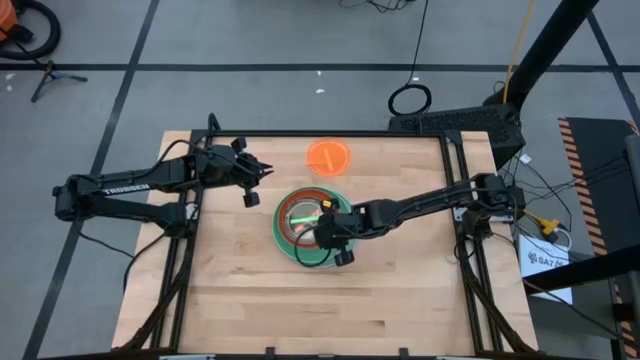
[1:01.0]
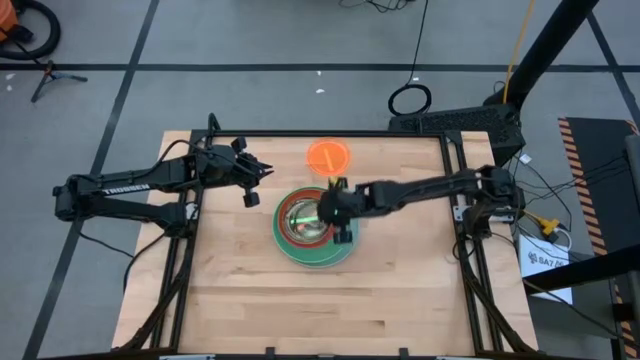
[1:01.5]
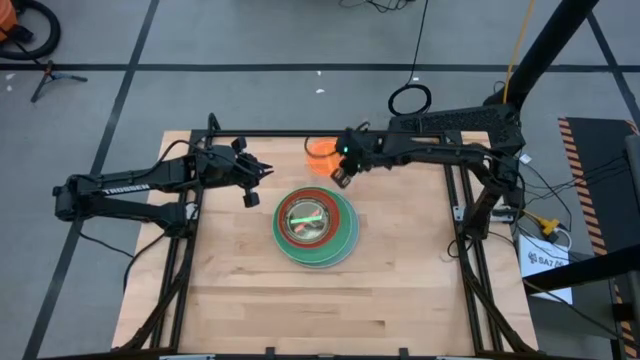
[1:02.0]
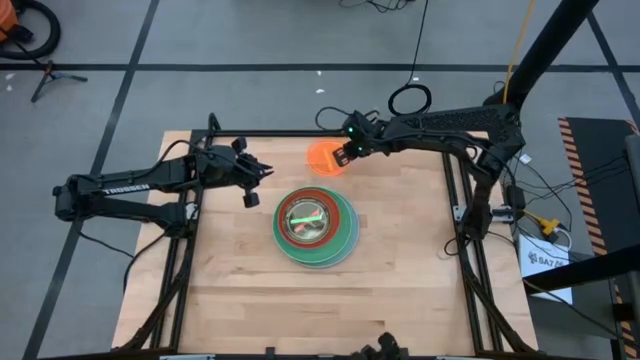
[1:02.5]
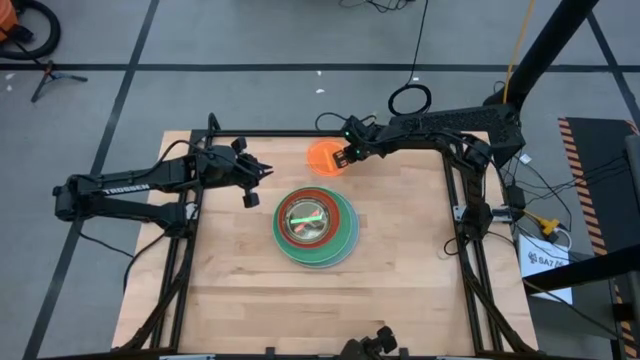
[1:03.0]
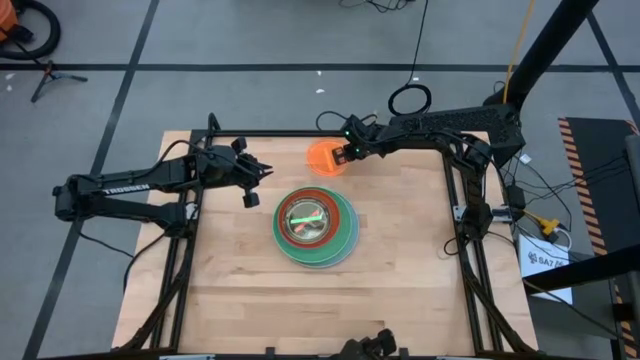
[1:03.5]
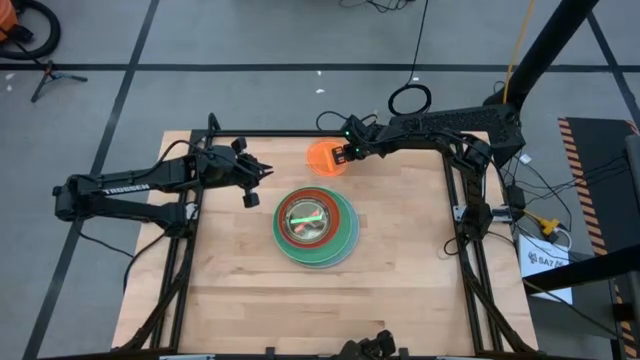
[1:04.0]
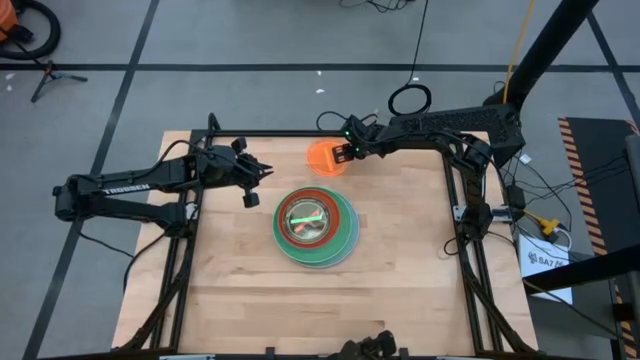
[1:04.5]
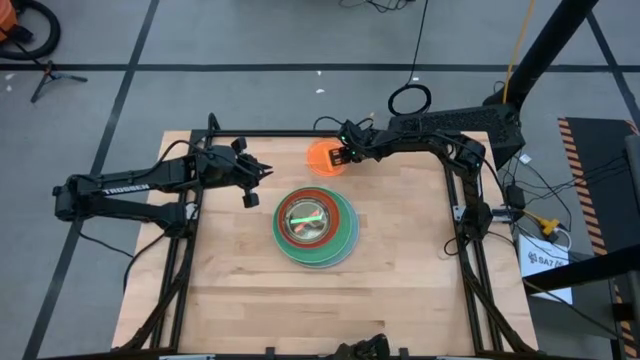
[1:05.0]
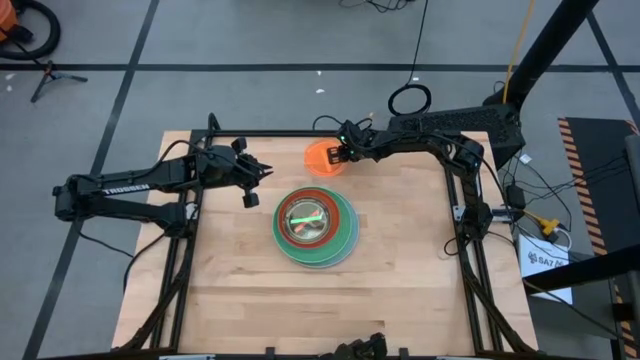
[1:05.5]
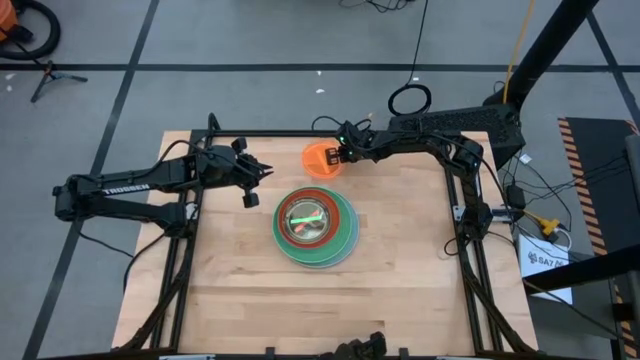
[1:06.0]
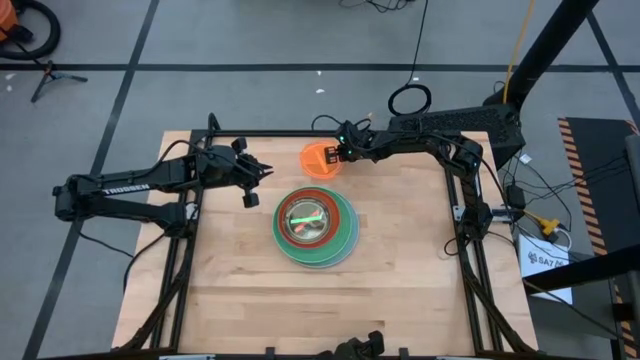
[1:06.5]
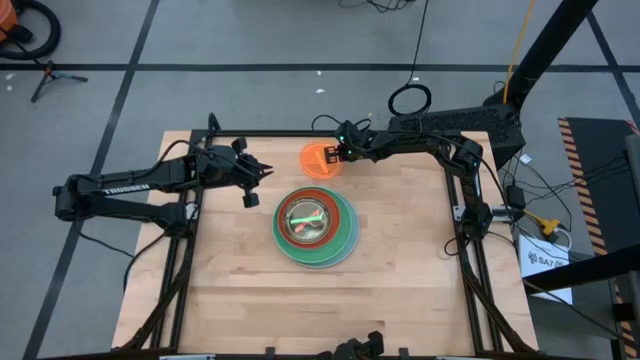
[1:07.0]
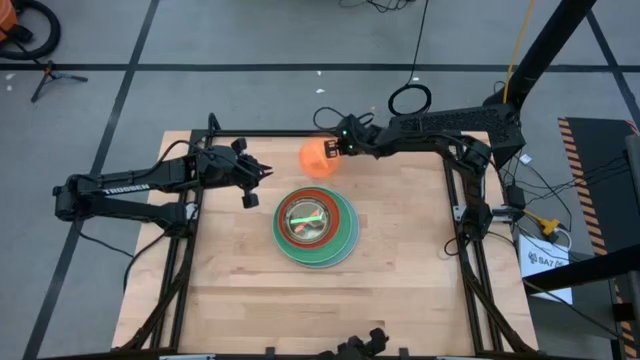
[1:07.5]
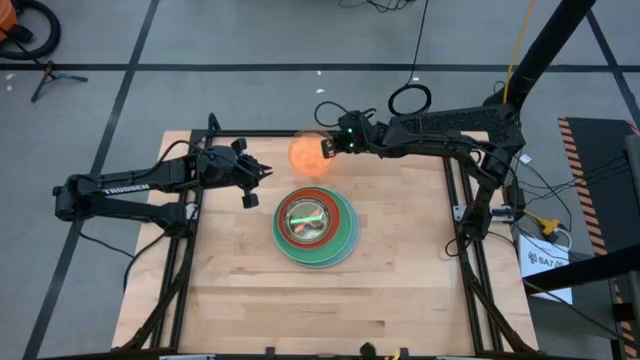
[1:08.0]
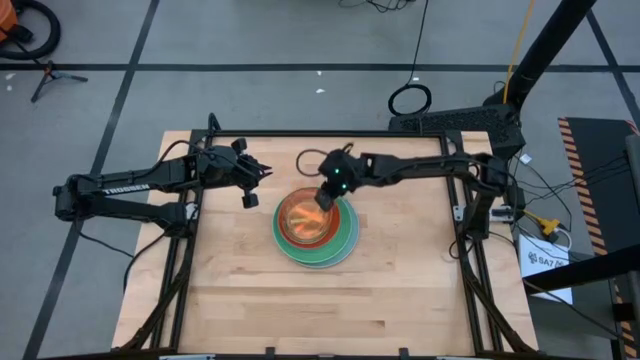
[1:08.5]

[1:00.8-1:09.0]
Task: Stack plastic plates
Stack the orange plate on top of the light green plate

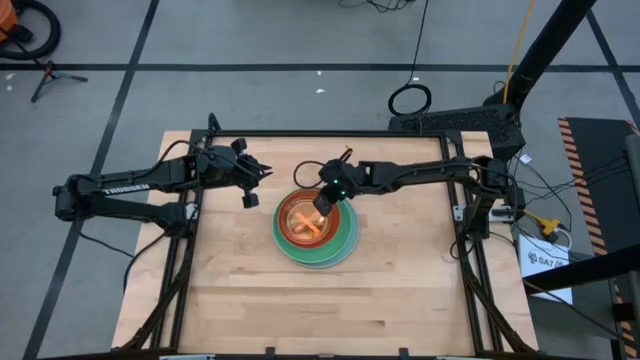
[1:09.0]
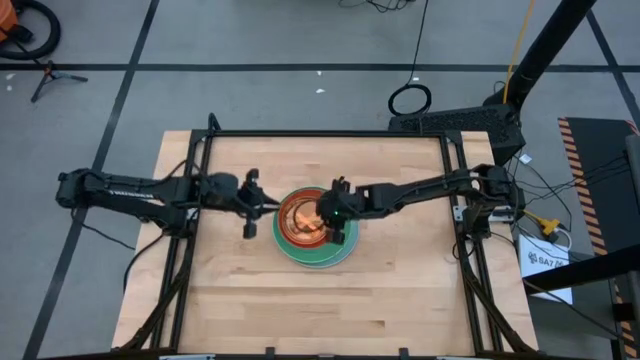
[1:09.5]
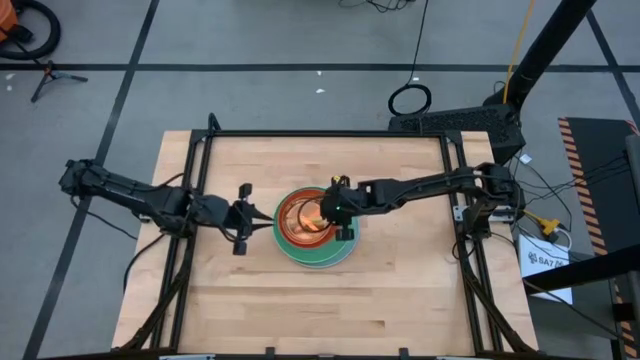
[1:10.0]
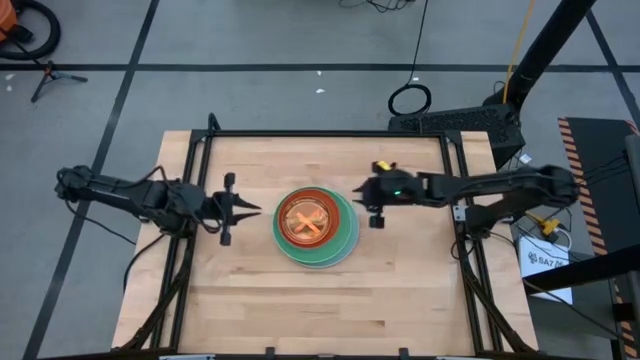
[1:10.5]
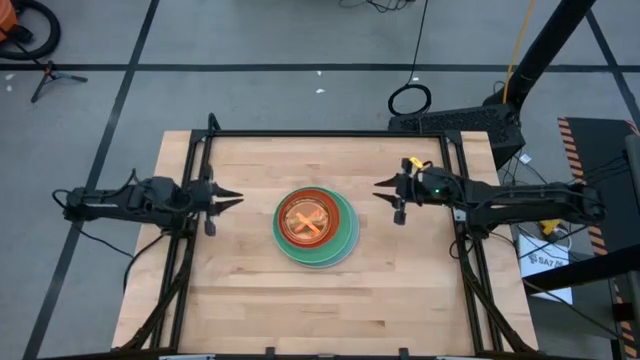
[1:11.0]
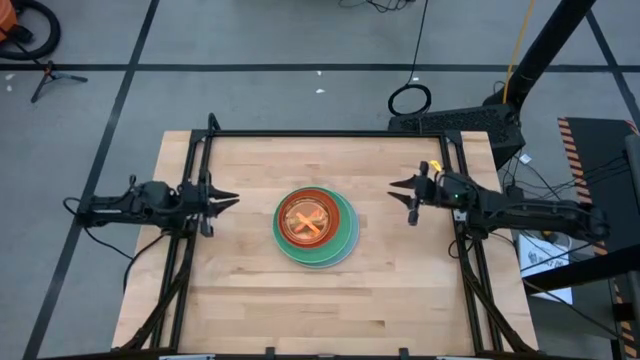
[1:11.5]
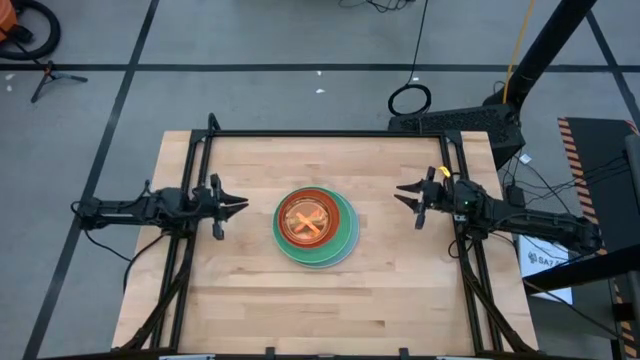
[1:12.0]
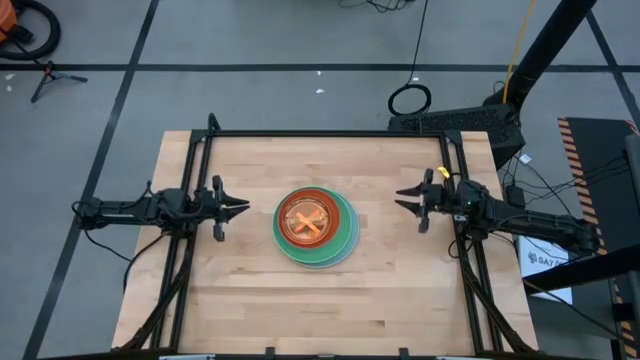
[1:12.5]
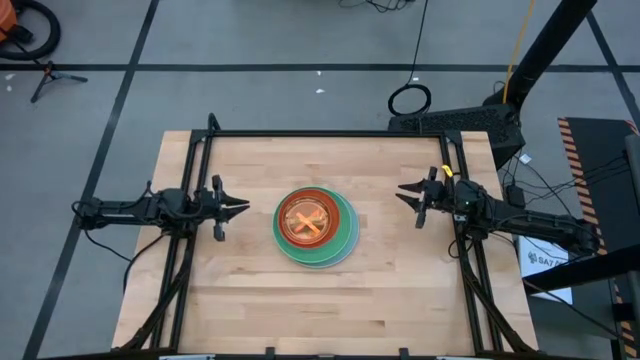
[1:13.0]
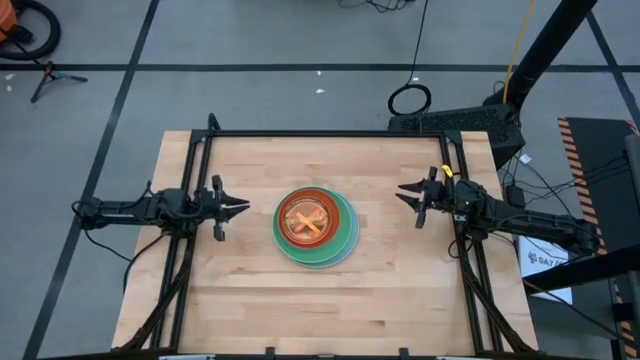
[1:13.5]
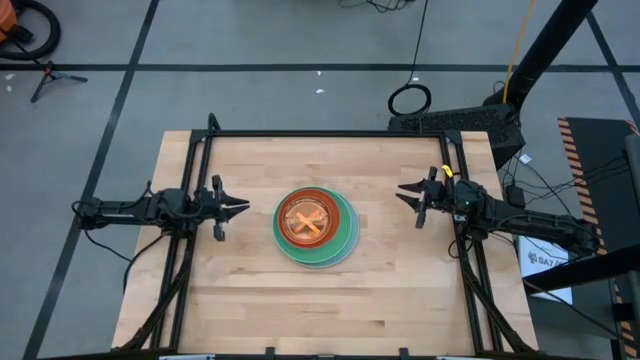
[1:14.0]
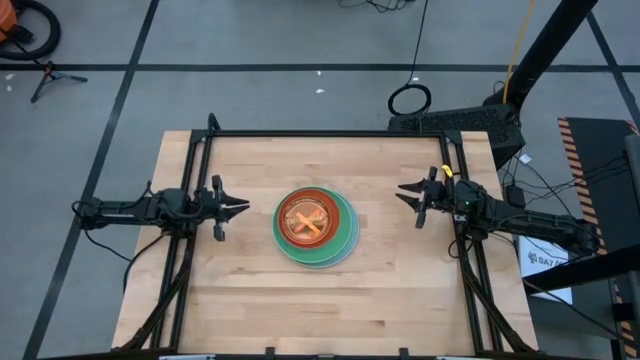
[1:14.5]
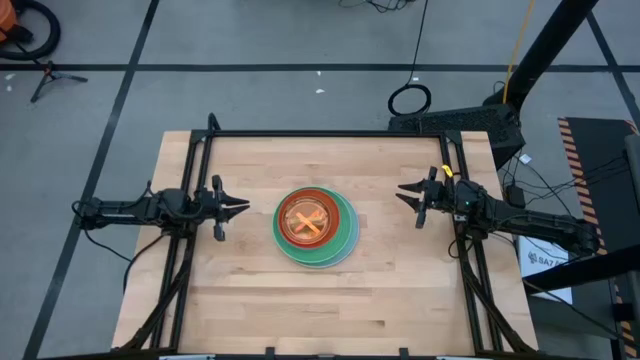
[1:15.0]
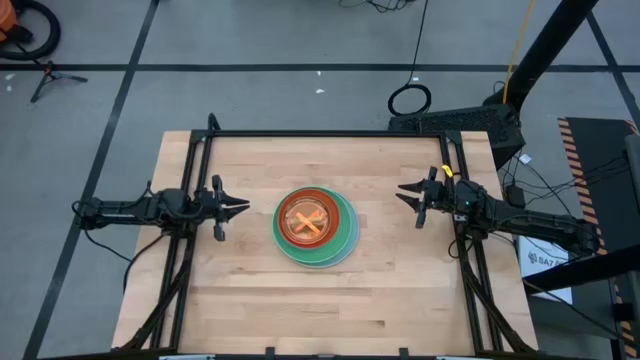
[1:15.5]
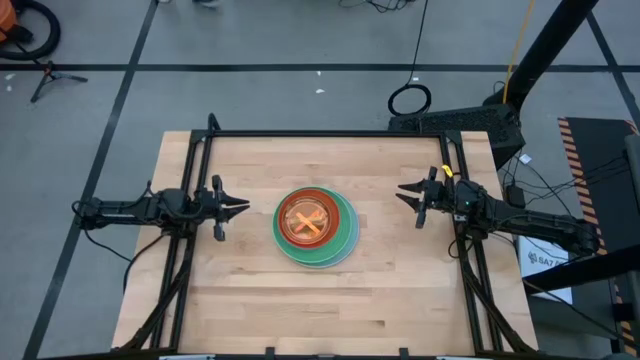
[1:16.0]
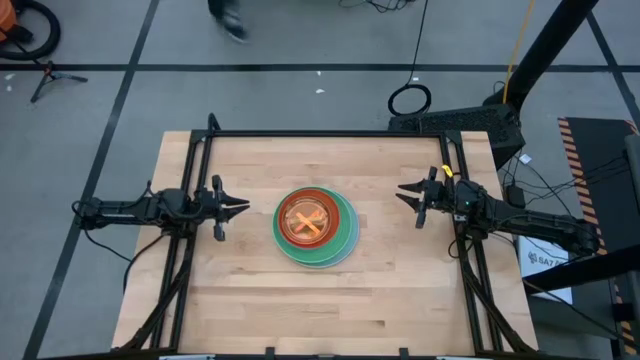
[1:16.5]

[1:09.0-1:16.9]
Return to Home Position

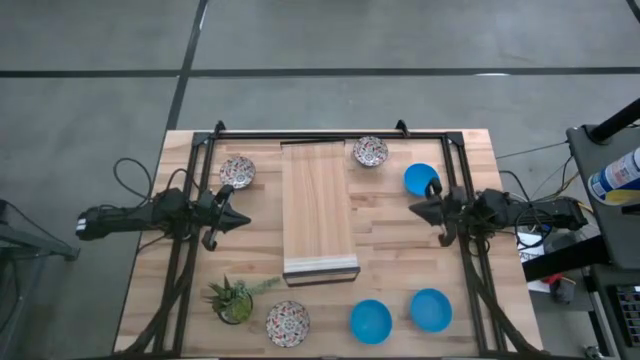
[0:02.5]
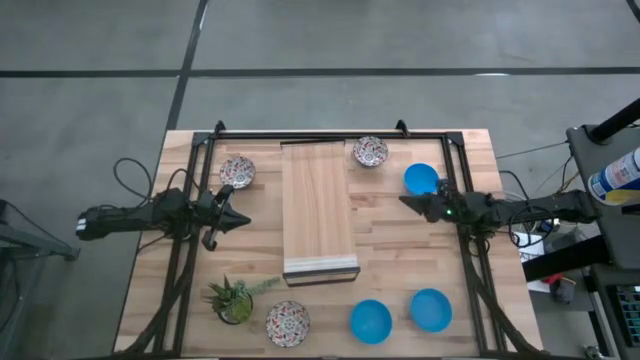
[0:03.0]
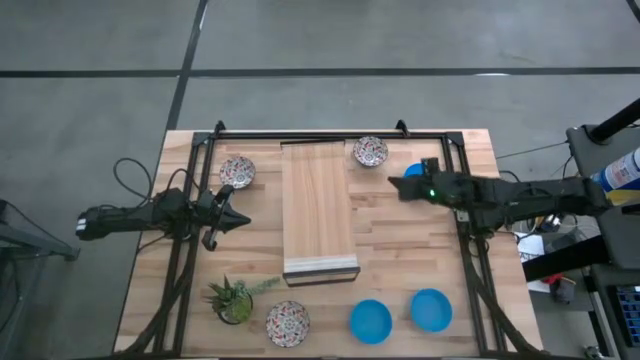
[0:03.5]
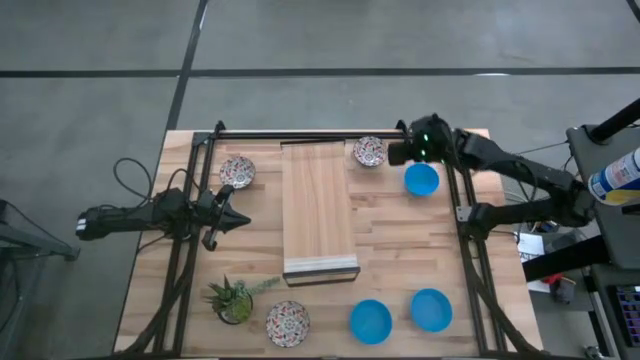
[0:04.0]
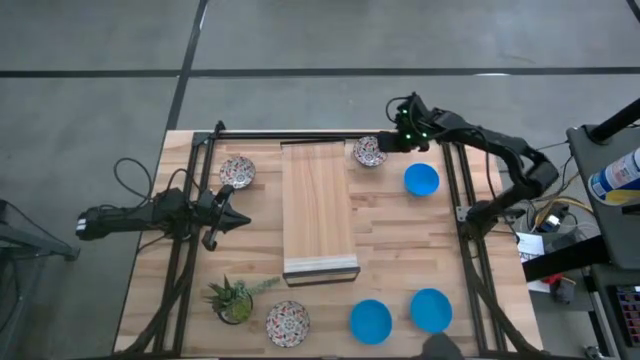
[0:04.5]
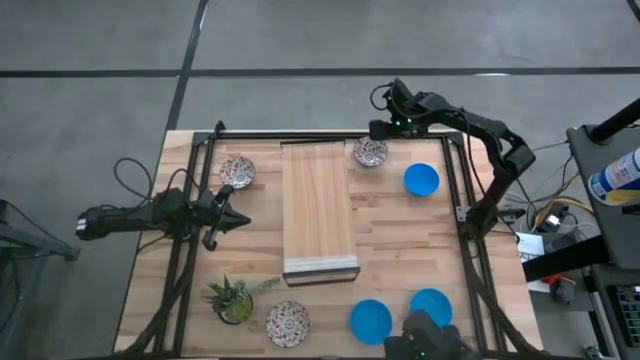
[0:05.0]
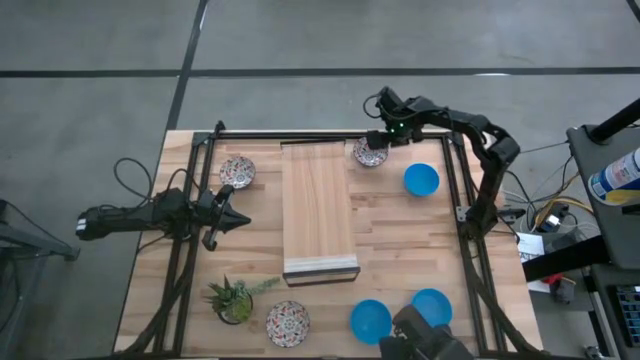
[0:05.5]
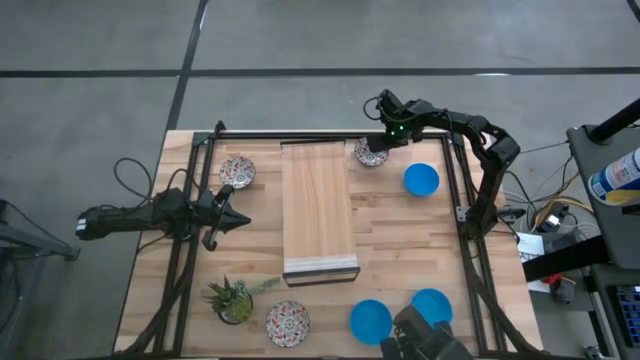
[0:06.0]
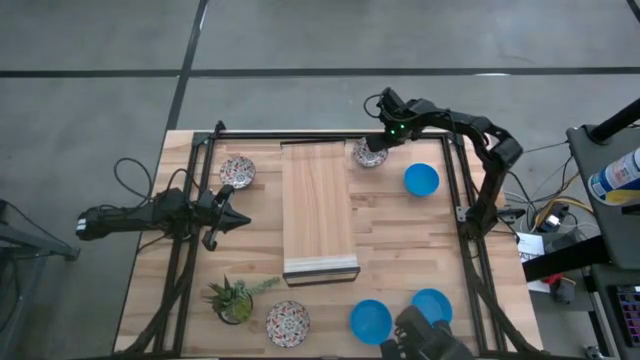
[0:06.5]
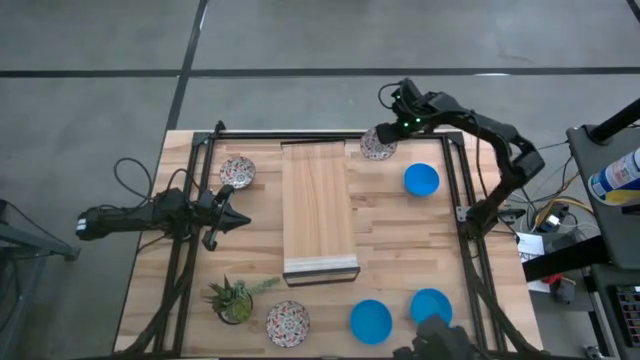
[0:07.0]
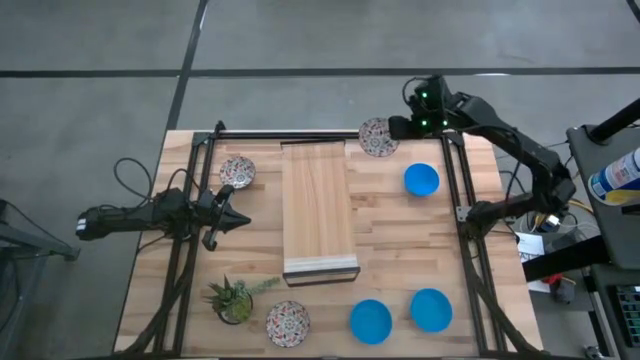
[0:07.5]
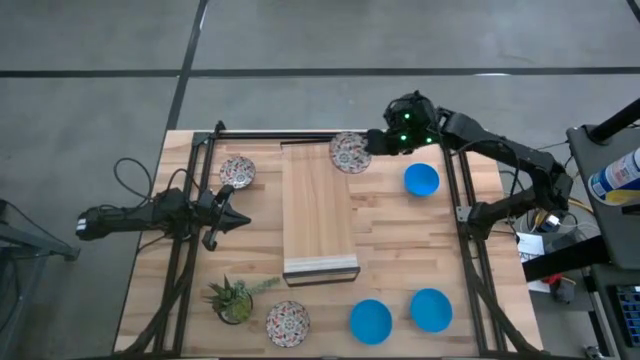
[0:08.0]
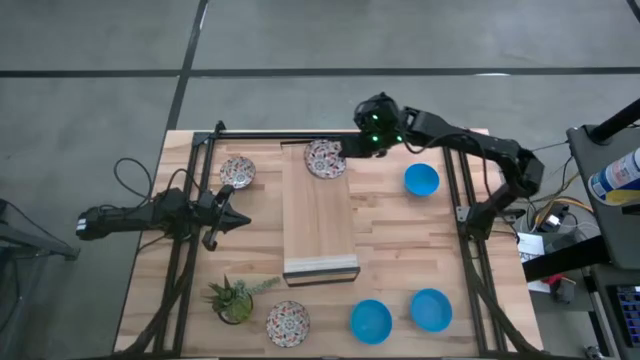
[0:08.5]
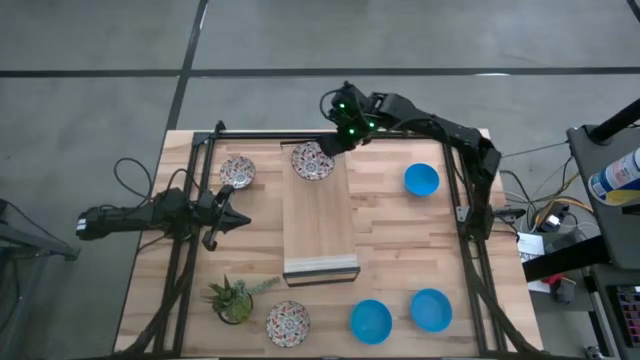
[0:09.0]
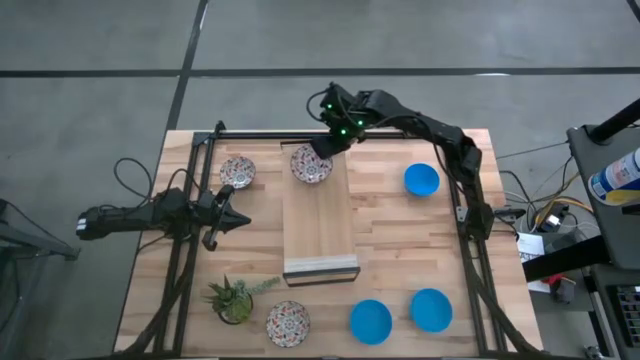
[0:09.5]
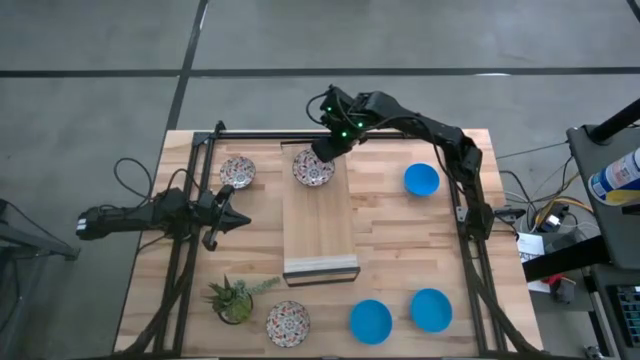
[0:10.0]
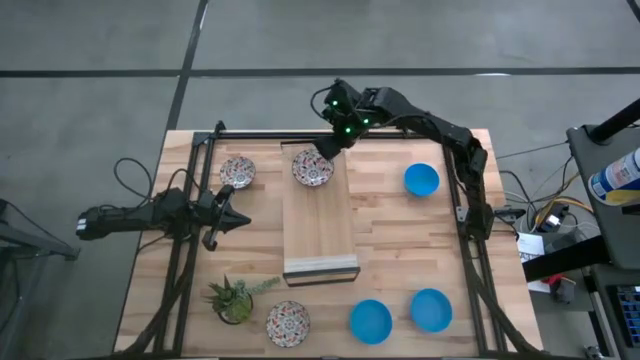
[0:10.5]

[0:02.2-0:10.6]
Task: Pick & Place Mini bowls
Put the top right white bowl on the shelf
